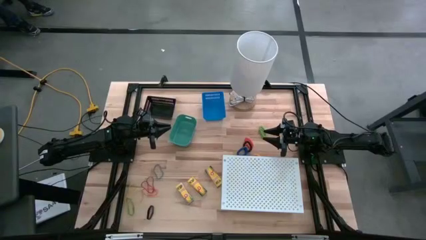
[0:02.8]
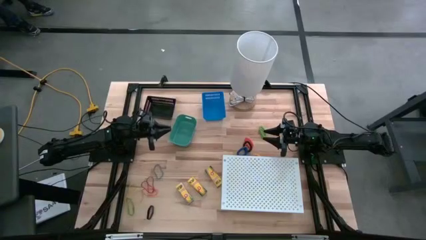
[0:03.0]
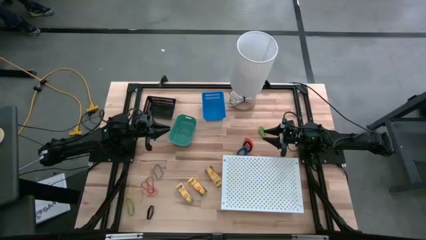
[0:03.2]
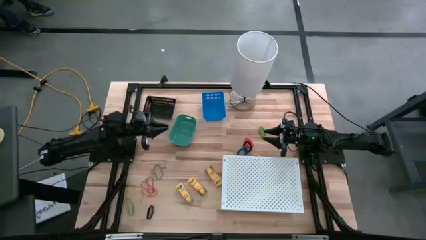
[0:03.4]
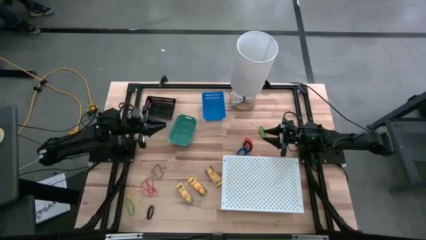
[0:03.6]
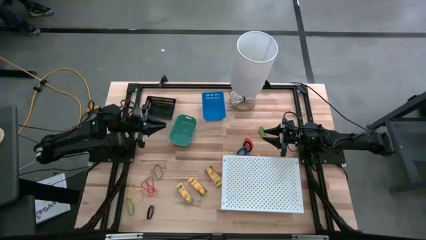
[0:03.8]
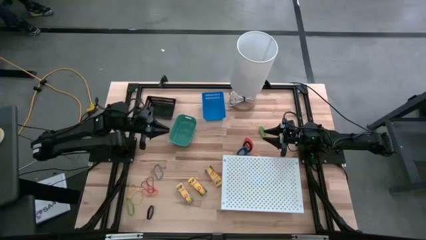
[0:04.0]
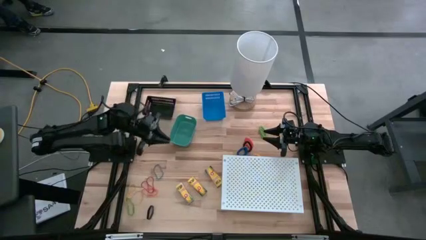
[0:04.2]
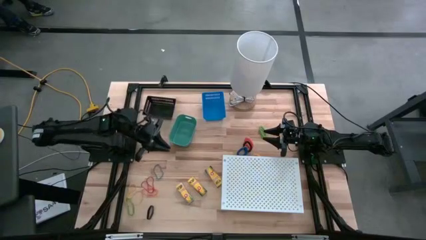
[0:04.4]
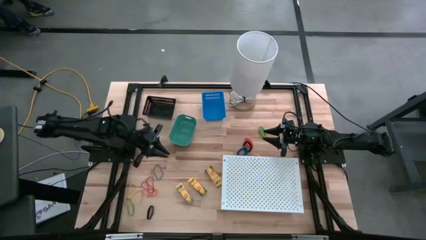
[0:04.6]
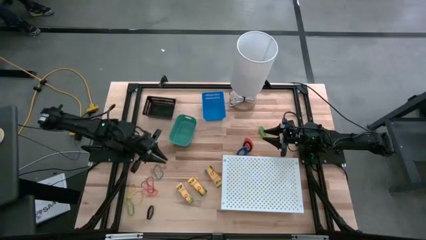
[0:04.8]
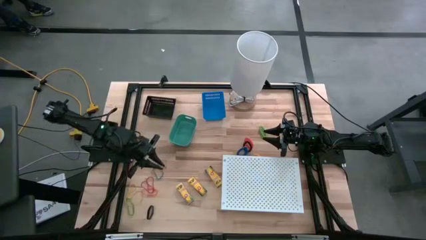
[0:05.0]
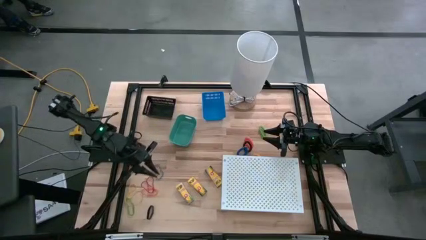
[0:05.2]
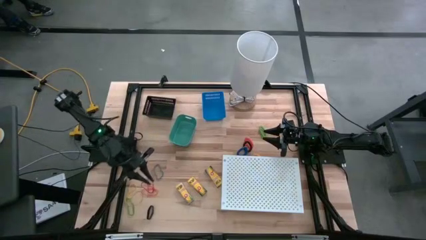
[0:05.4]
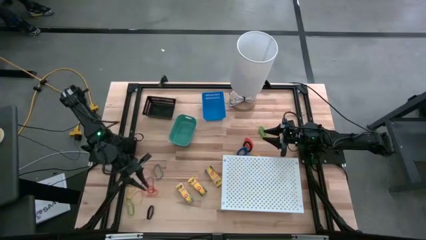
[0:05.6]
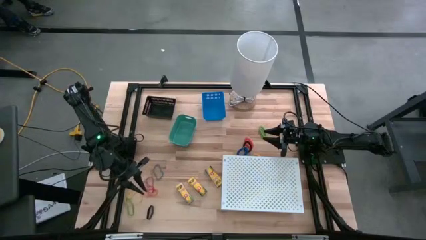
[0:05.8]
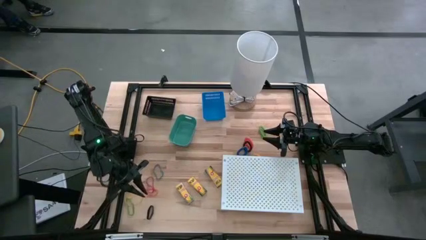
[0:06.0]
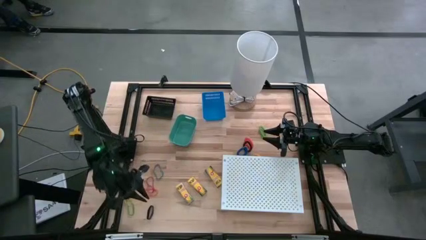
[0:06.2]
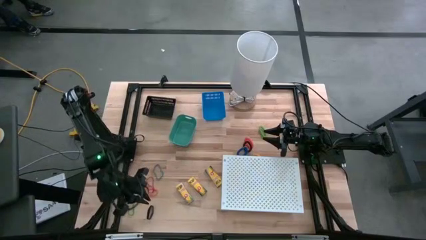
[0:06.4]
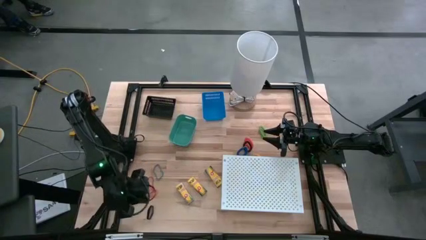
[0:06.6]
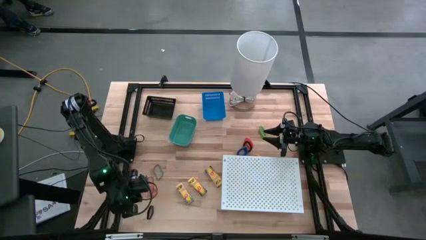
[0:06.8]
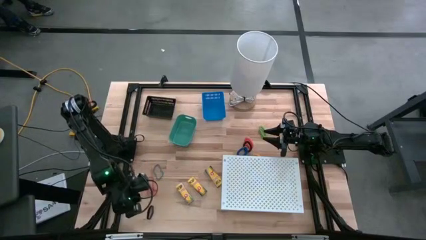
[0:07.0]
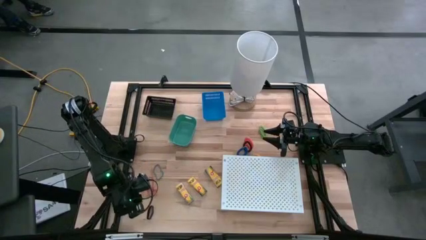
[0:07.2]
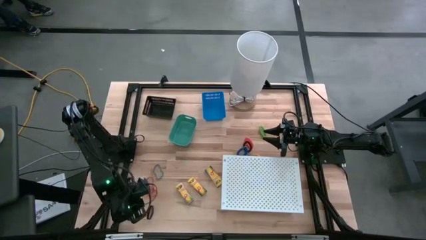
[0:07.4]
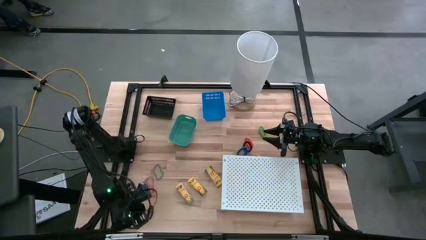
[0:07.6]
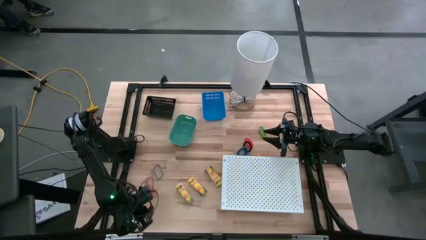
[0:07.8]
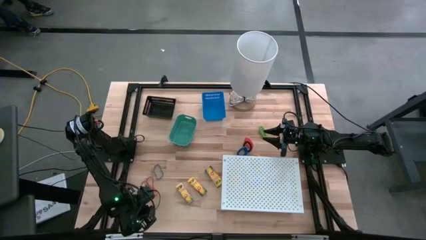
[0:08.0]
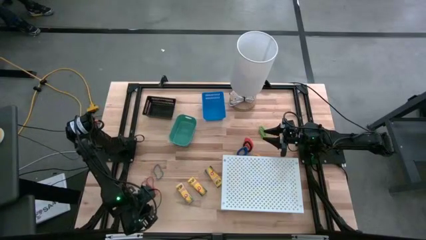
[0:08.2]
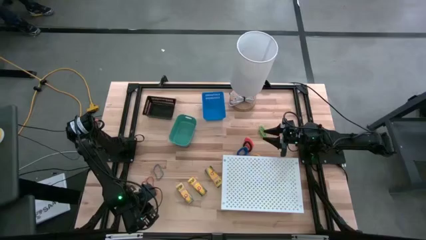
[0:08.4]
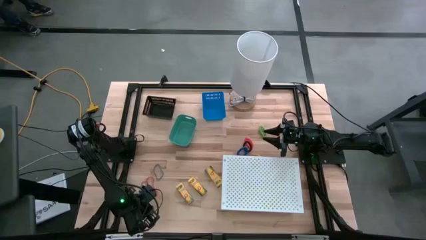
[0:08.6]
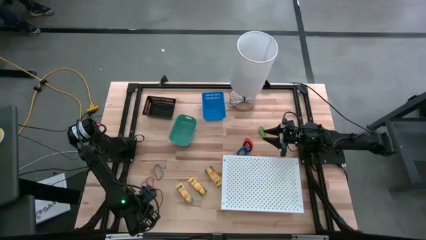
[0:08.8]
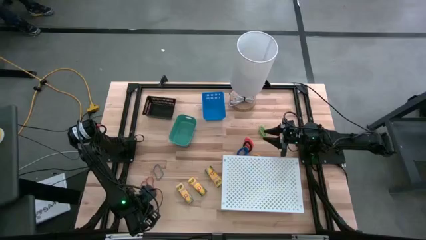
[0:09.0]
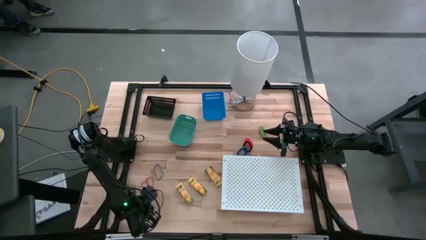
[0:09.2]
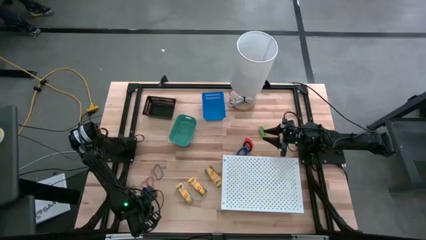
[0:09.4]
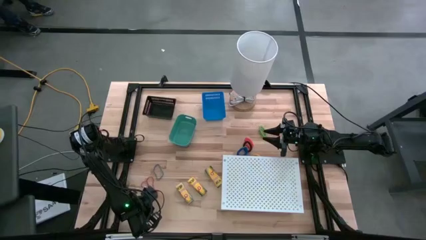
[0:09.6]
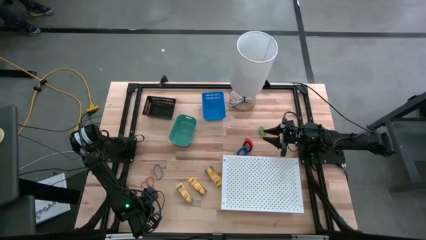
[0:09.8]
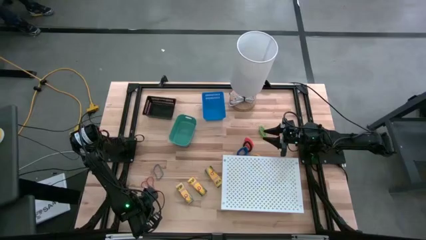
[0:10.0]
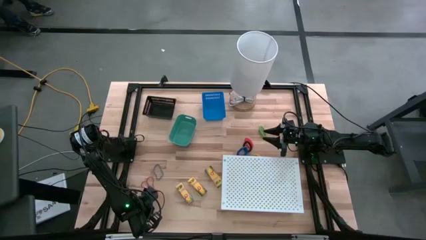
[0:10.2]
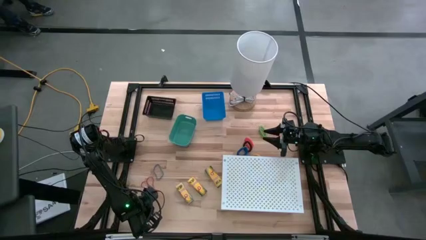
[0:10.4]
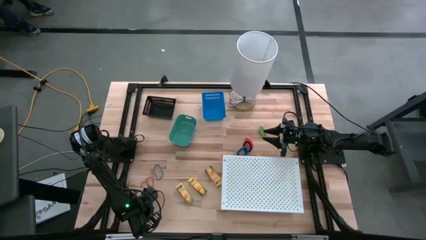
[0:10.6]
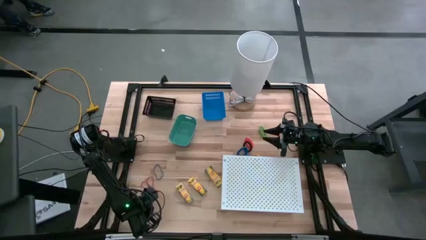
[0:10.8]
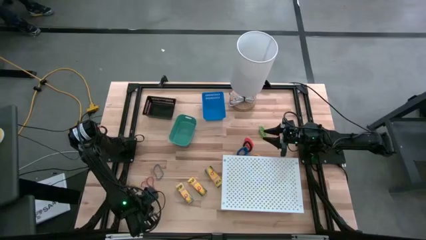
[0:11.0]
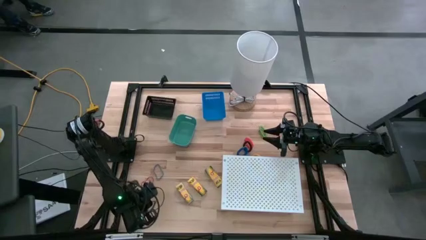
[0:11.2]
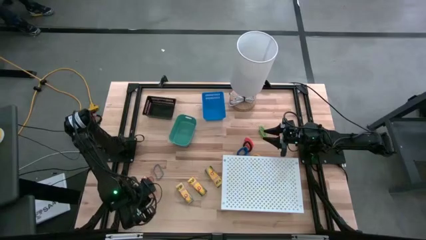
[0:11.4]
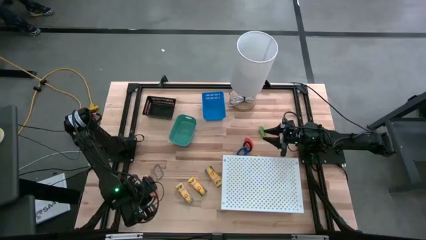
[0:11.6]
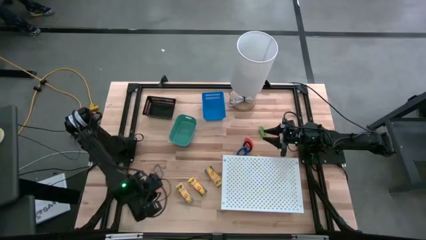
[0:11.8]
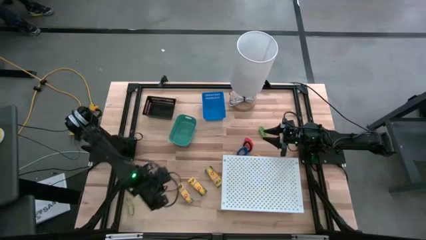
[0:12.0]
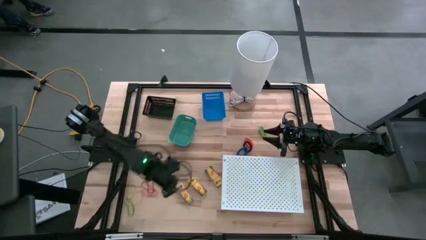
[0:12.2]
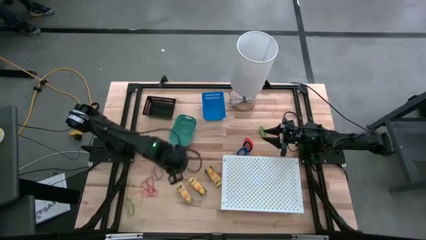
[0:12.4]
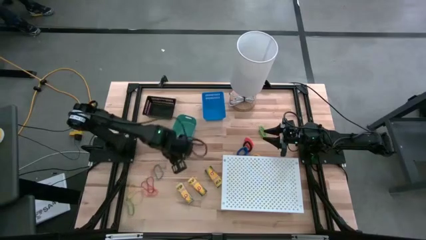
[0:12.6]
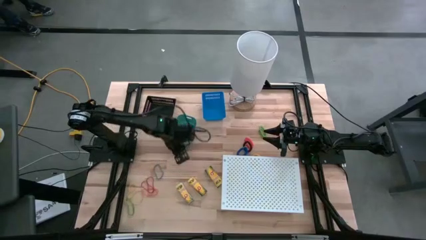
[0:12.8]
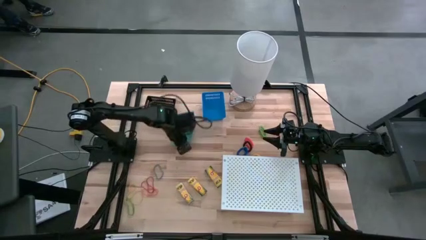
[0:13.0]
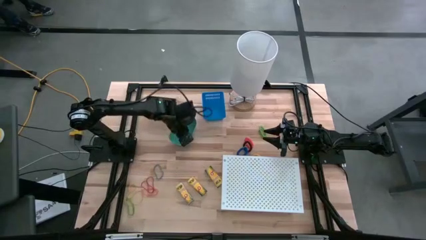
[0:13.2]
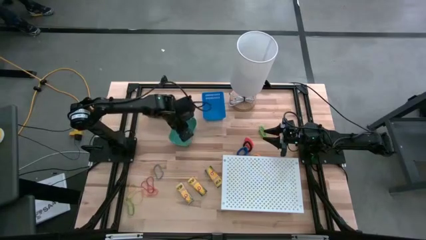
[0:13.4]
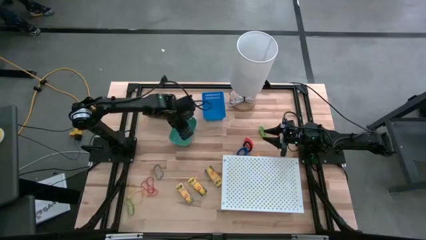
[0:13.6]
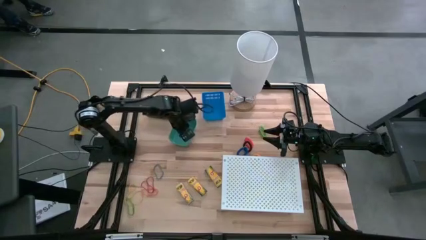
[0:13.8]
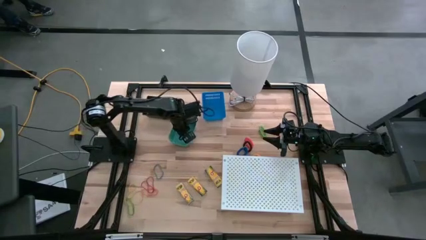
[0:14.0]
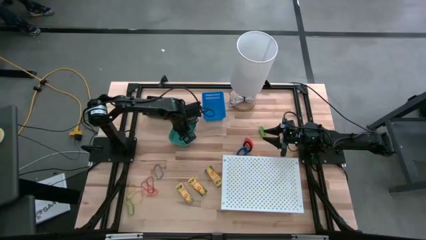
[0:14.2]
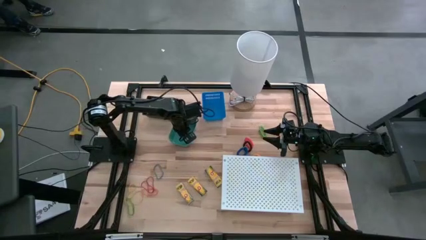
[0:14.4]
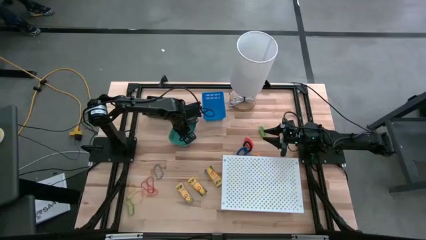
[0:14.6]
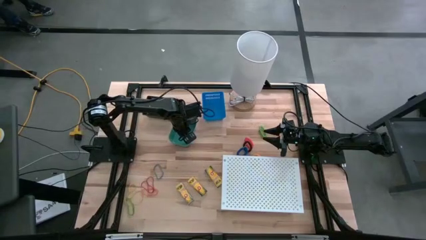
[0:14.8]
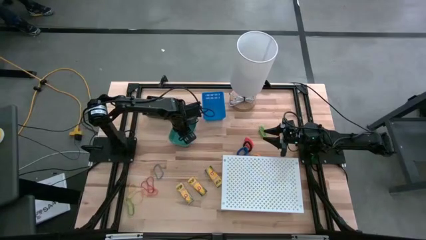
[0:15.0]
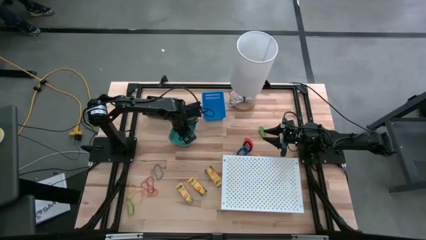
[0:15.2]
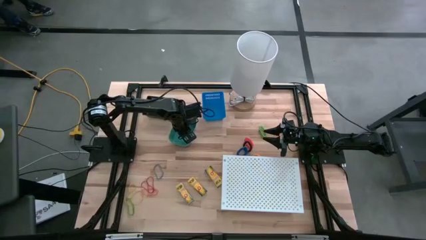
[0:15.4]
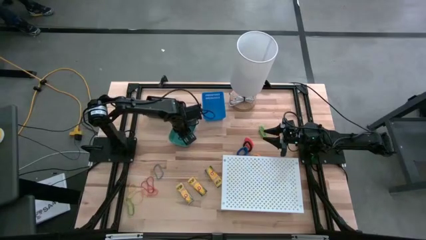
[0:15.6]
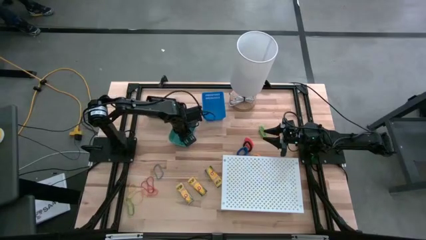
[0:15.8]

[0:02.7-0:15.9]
Task: Pick & Place Office Desk Supplies
Put the black rubber band into the green bin
